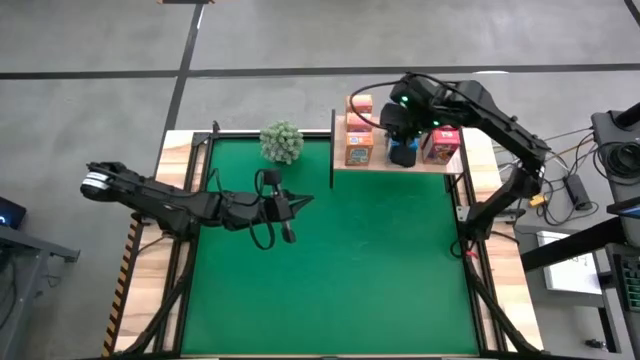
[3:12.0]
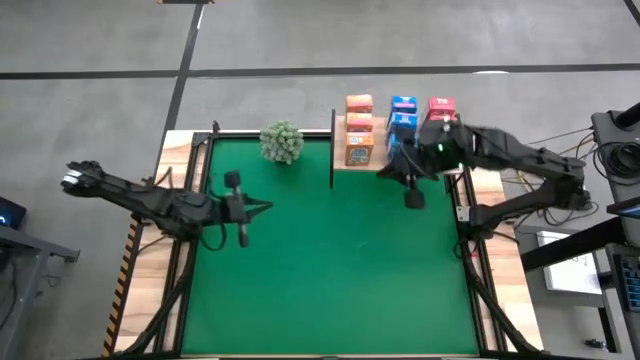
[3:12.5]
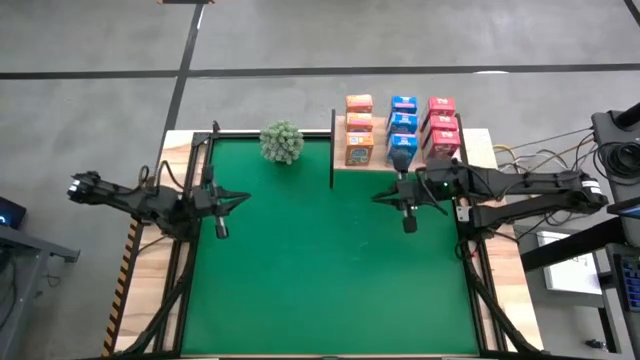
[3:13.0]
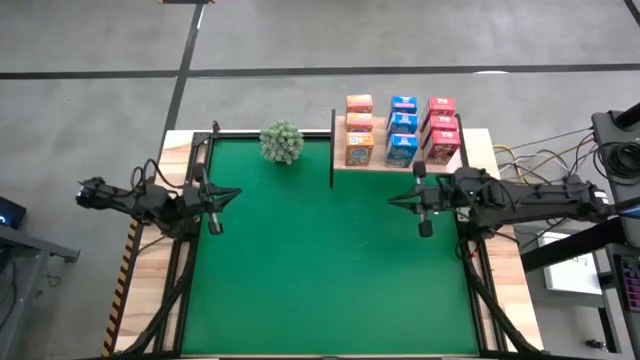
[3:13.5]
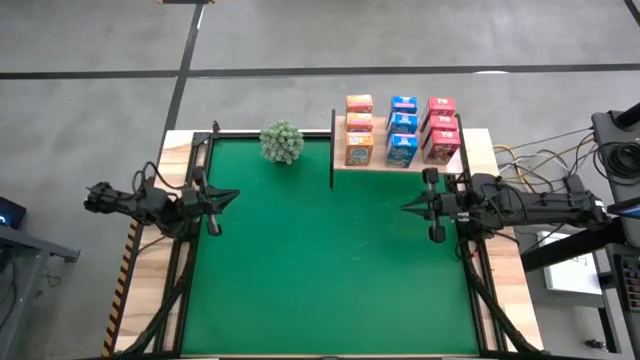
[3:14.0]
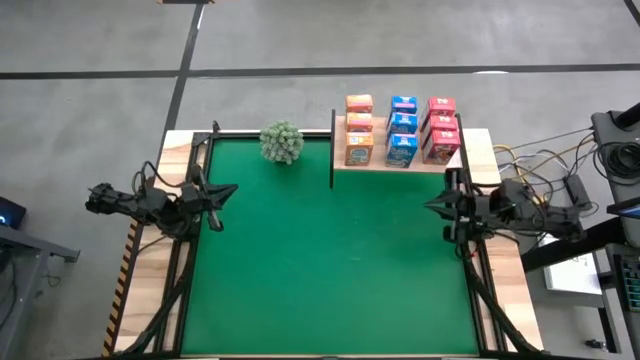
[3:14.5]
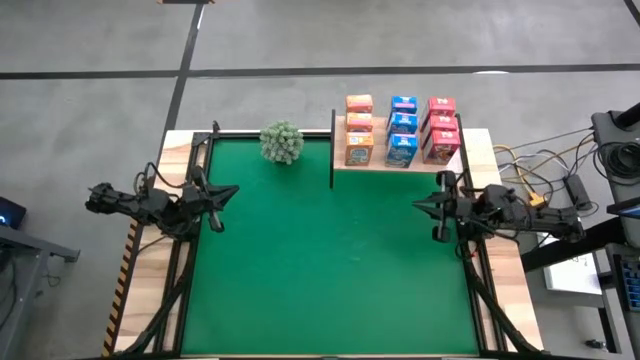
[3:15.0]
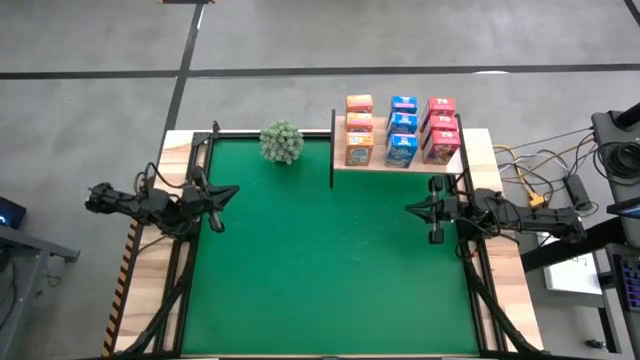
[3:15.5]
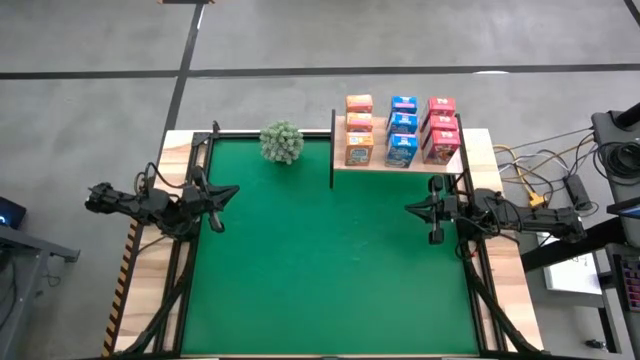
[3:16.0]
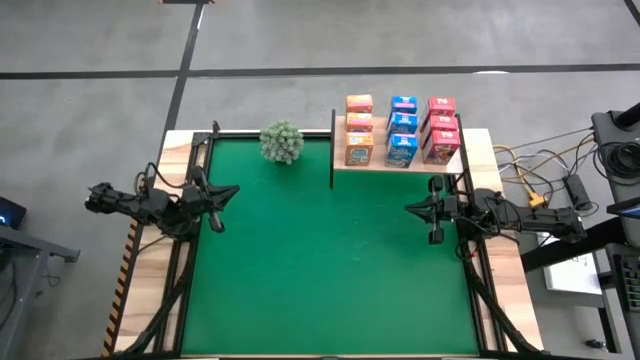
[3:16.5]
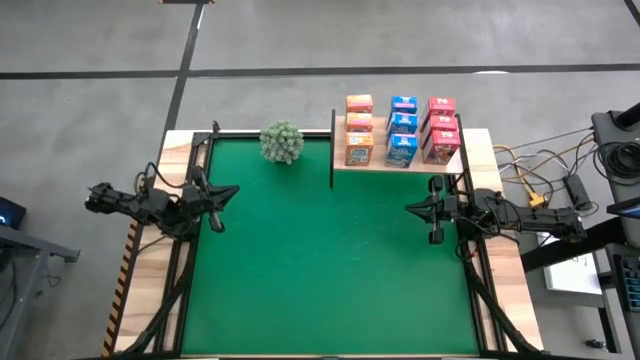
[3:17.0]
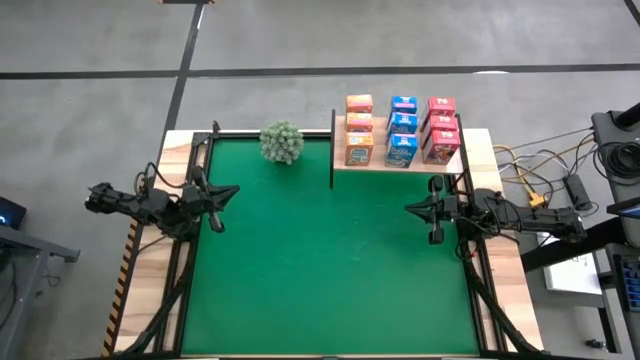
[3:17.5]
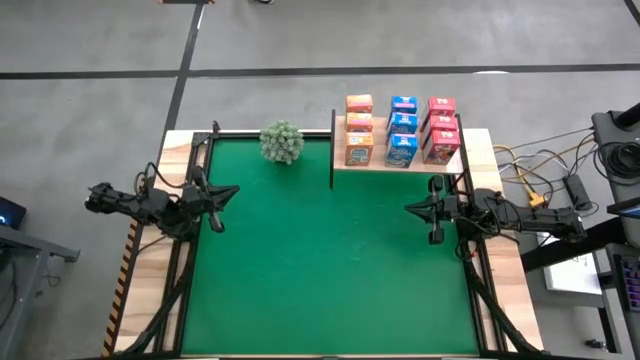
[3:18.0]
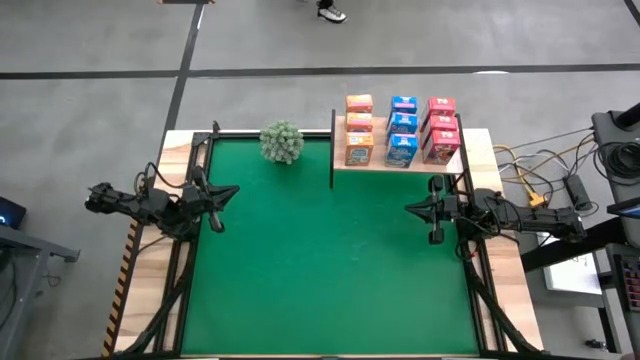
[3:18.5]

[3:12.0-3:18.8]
Task: Stack cereal on shelf
Return to Home Position

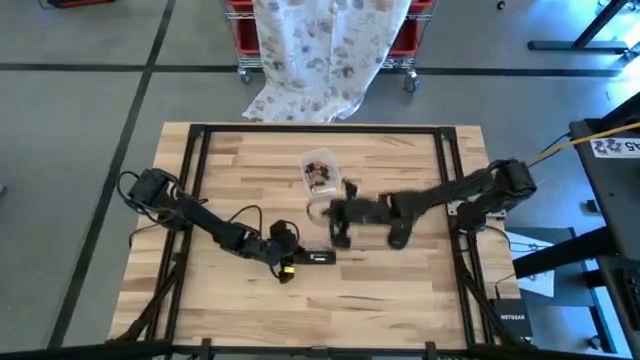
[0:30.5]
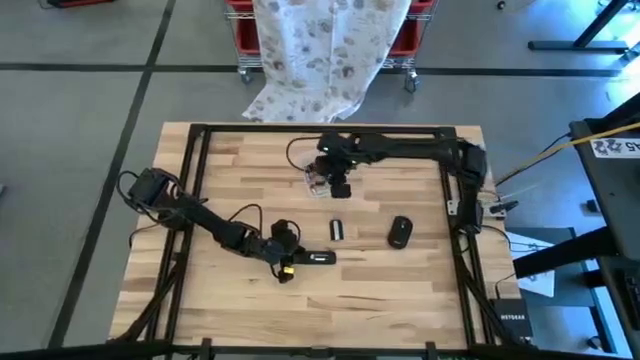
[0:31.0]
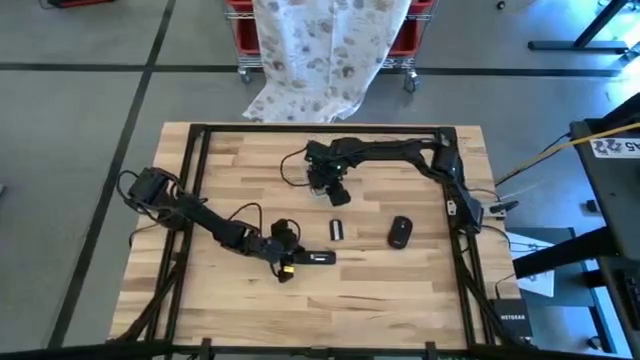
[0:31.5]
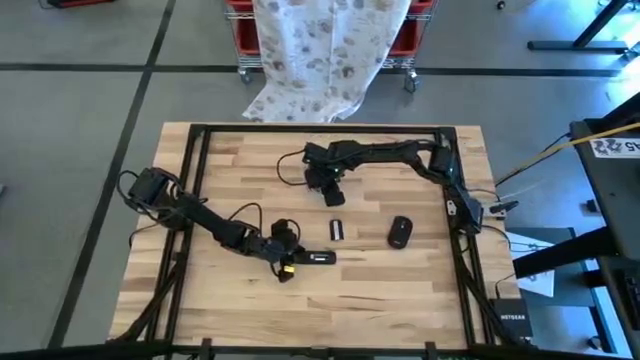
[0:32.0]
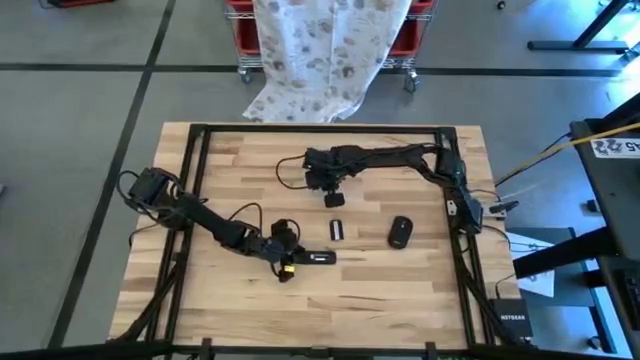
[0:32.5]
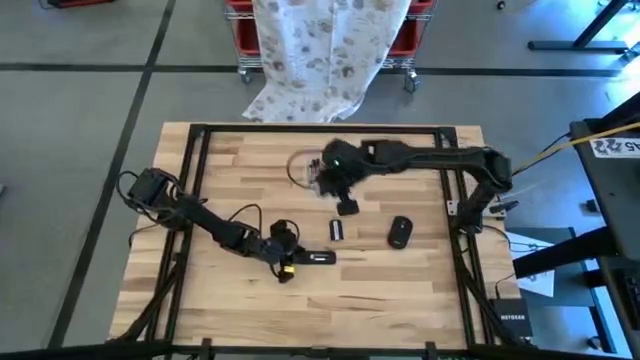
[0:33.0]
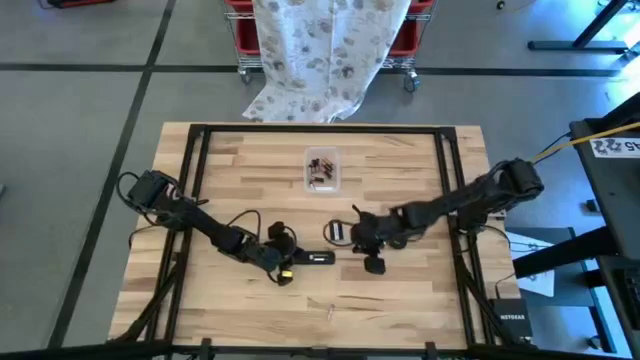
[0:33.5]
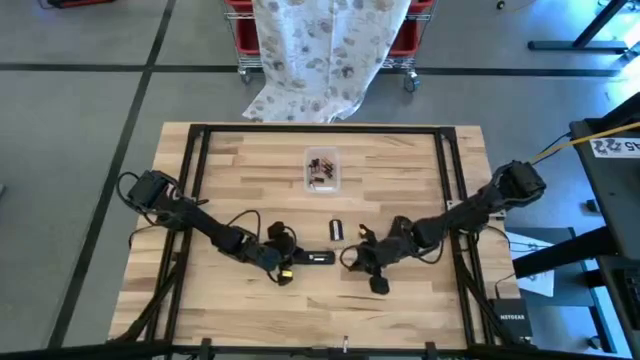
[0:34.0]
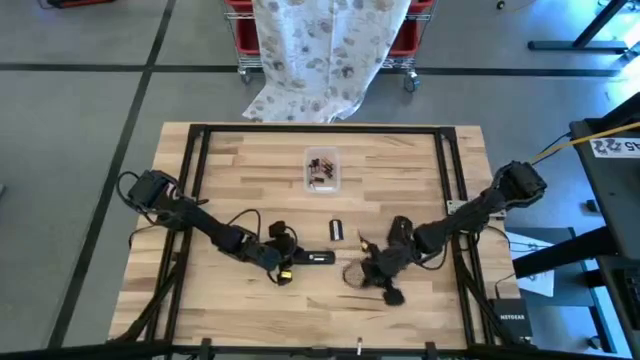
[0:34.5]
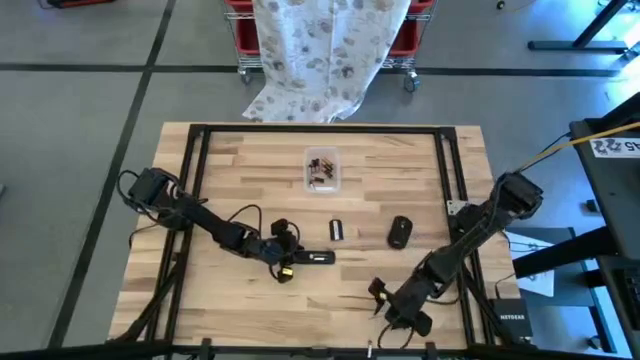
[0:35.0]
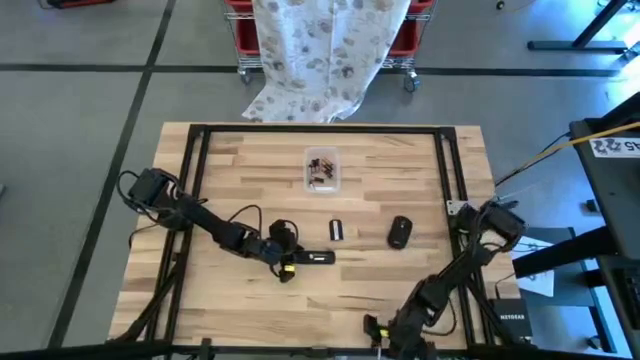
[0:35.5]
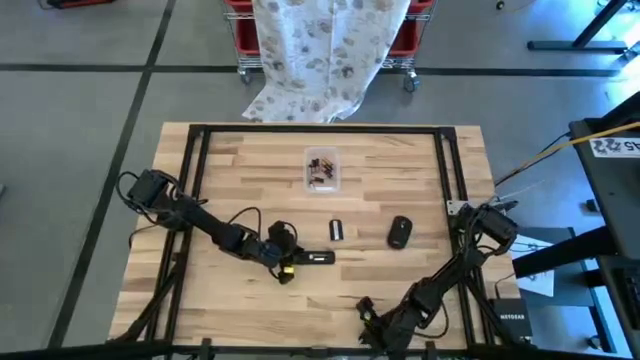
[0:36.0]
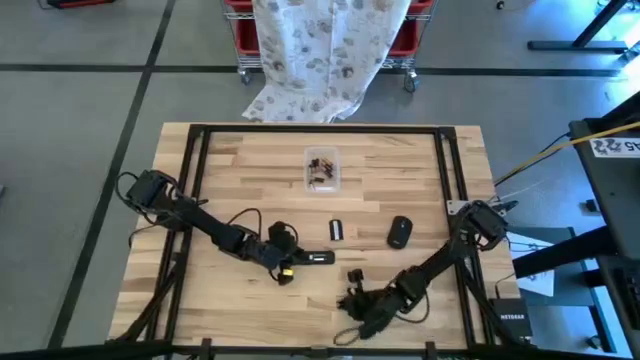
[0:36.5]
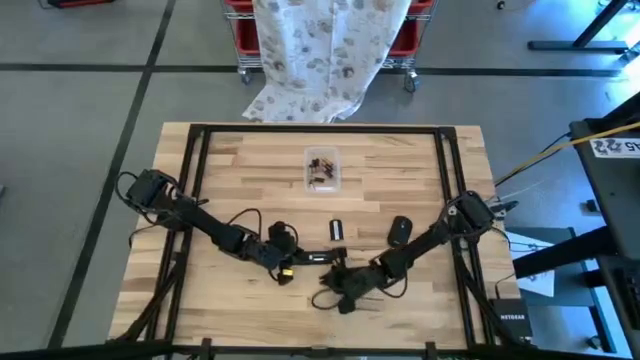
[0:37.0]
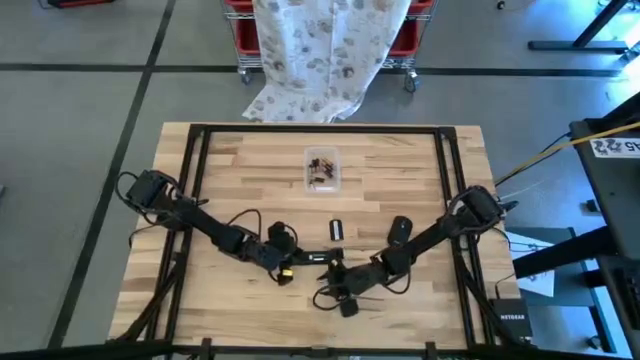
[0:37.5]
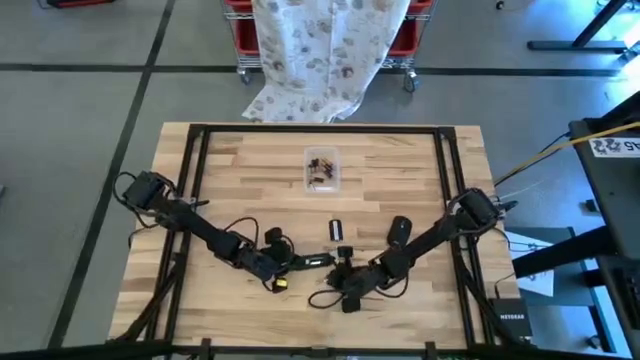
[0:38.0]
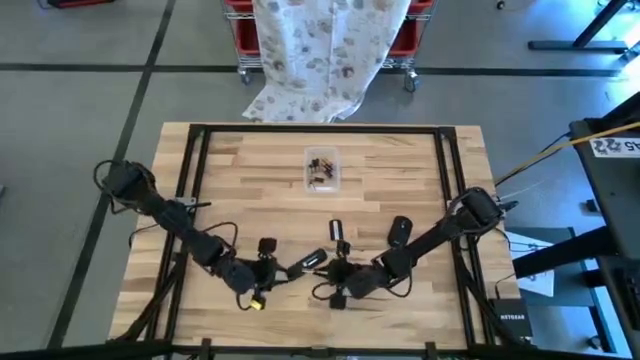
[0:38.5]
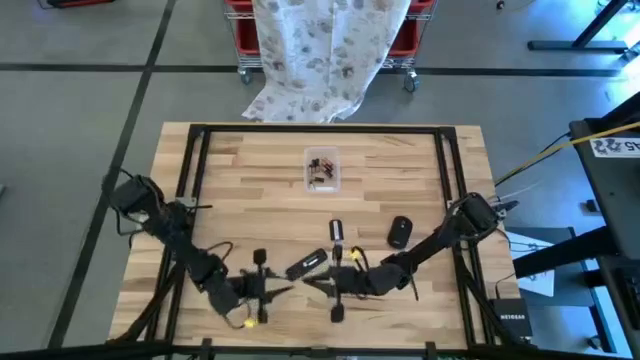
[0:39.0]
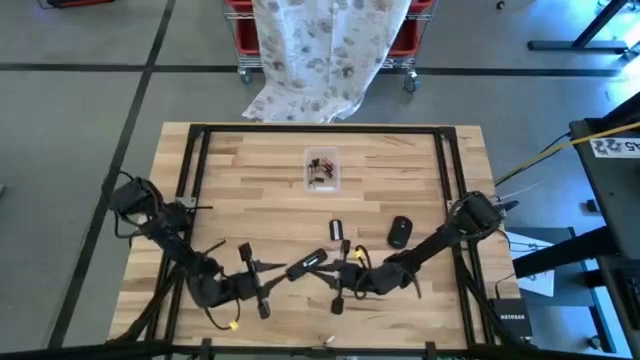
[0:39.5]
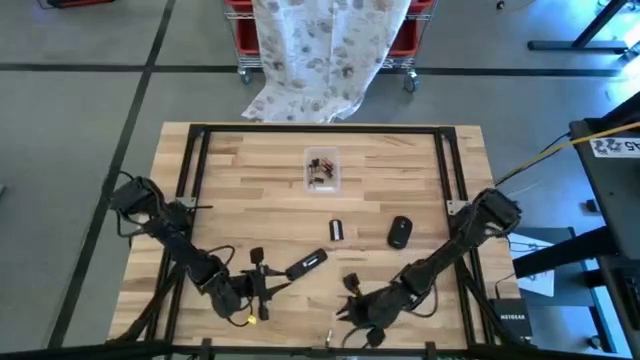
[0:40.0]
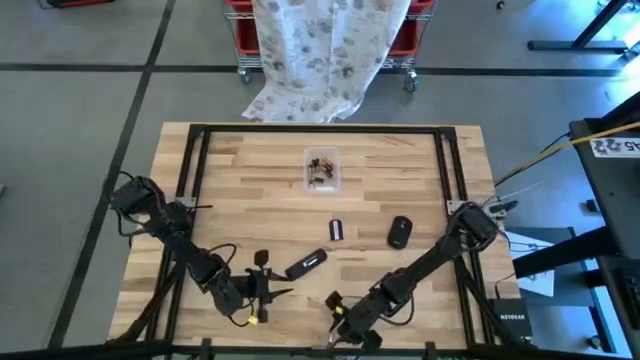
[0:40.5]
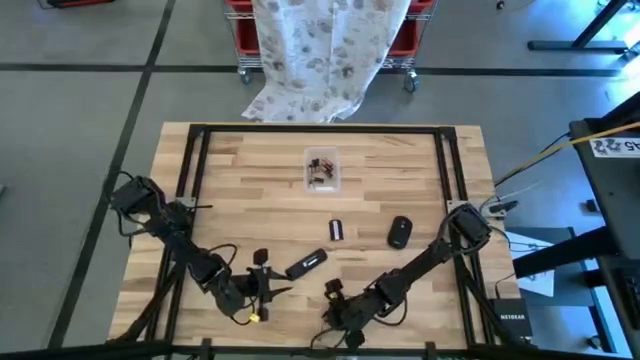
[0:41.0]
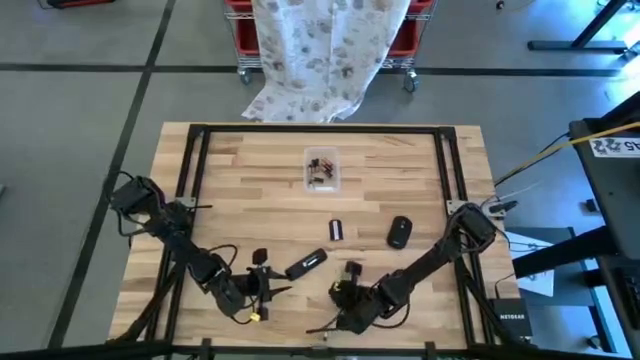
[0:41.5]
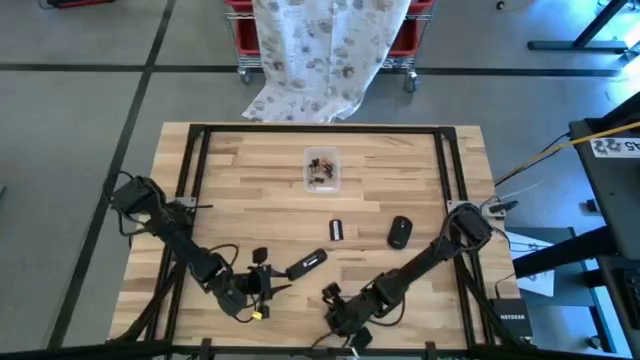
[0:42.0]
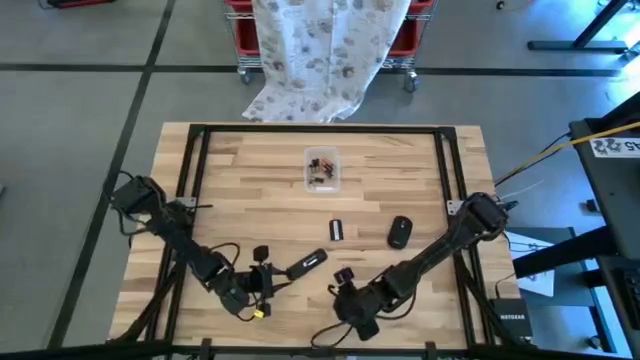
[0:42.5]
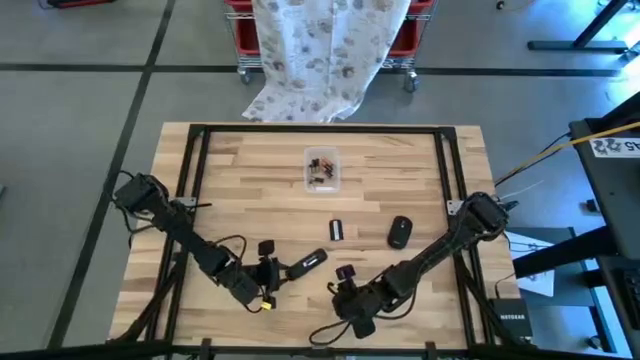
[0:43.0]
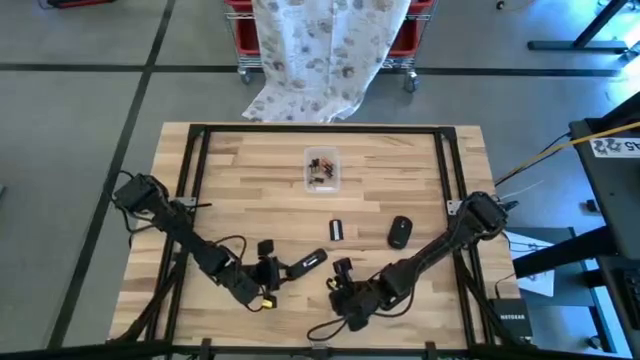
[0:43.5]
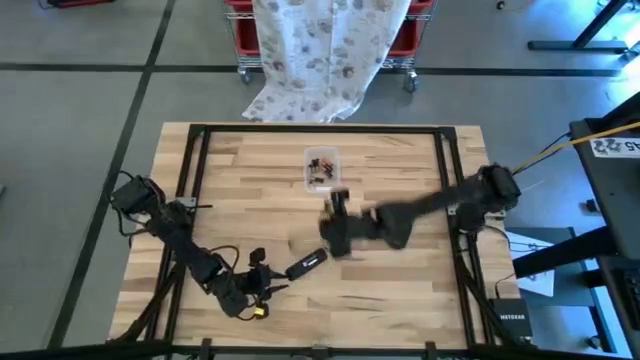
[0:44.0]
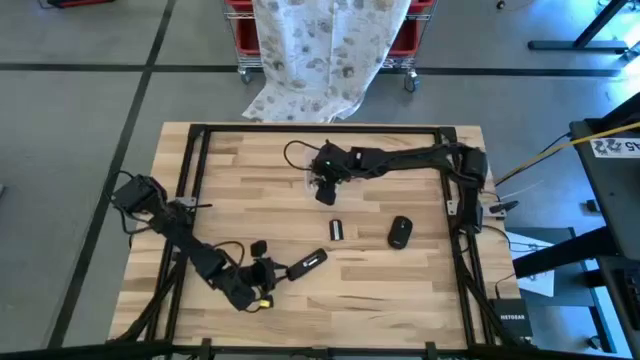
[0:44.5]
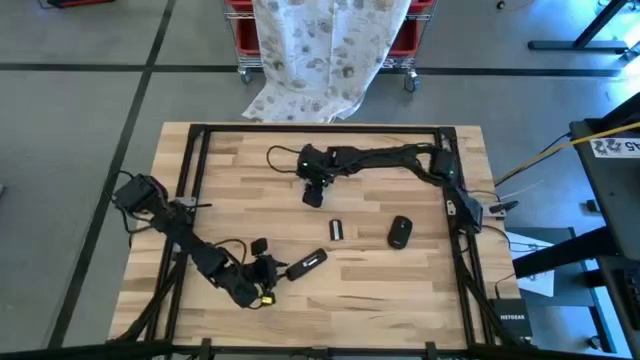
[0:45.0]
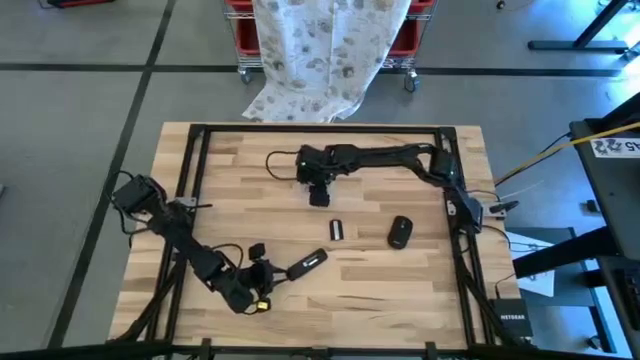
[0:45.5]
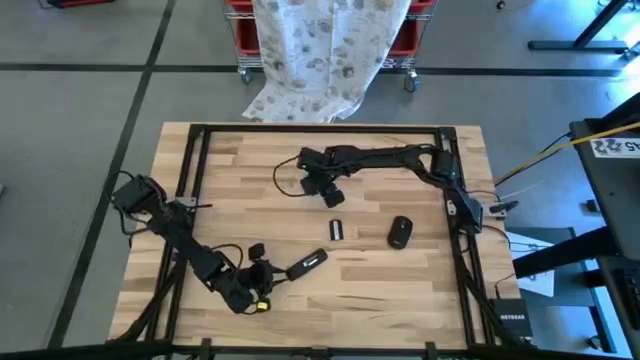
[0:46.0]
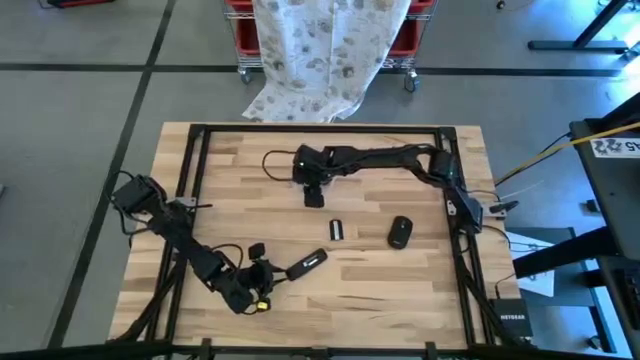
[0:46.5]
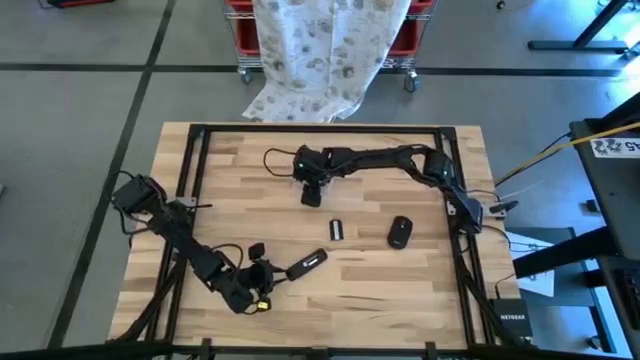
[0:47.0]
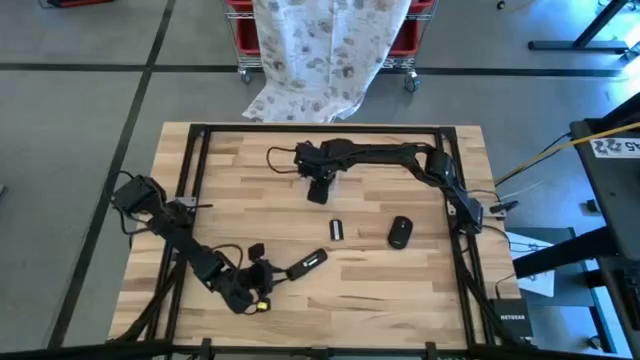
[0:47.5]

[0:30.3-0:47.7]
Task: Insert battery
Insert the white battery into the remote control
